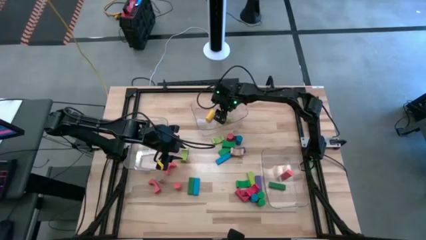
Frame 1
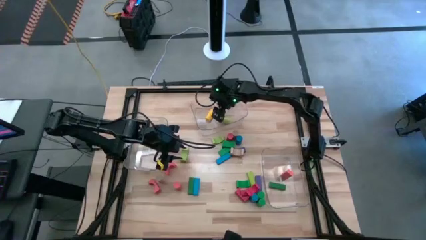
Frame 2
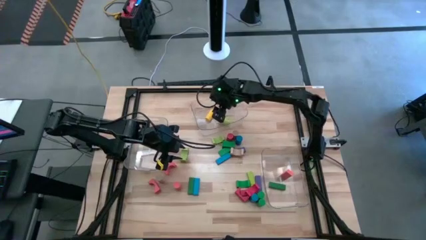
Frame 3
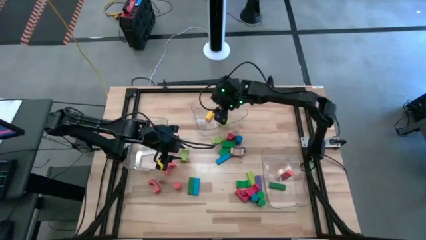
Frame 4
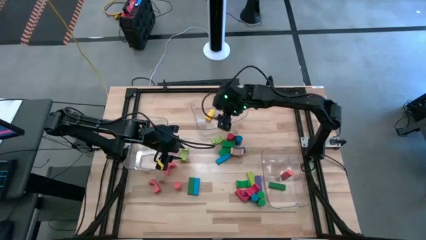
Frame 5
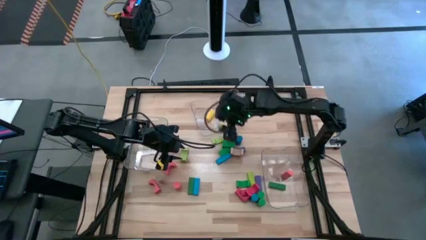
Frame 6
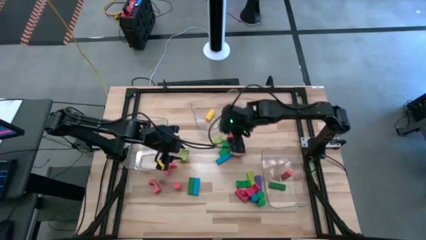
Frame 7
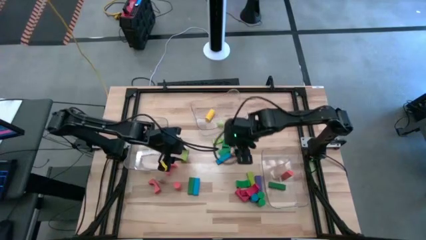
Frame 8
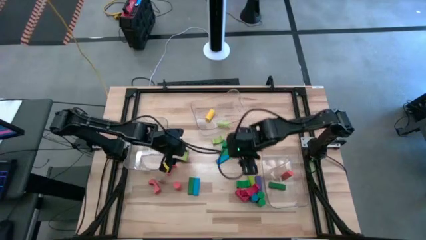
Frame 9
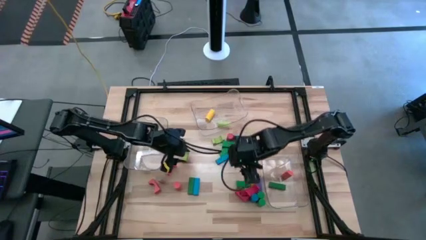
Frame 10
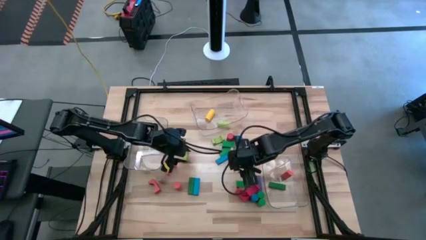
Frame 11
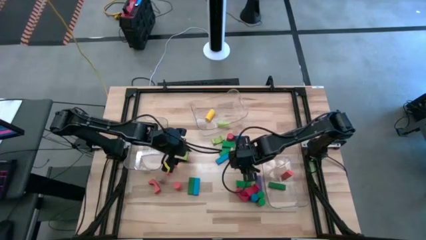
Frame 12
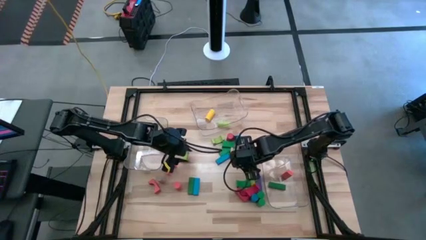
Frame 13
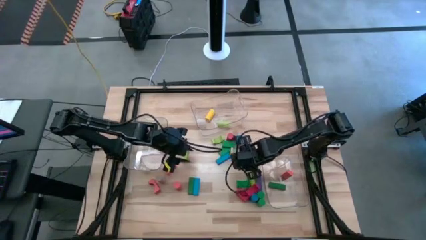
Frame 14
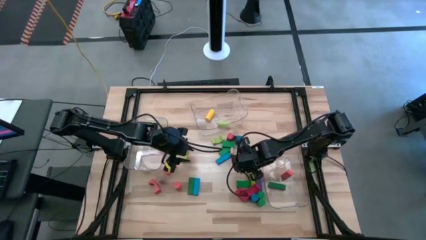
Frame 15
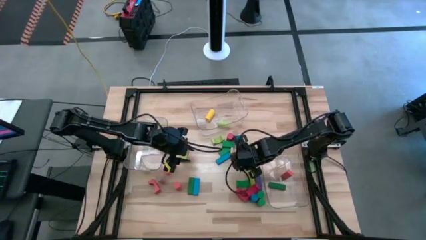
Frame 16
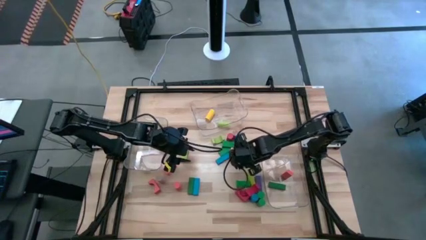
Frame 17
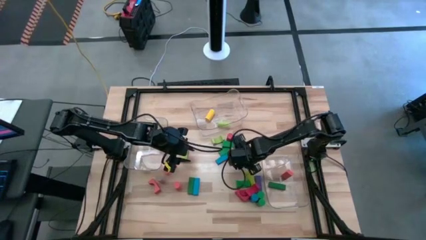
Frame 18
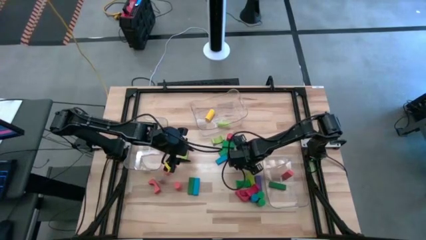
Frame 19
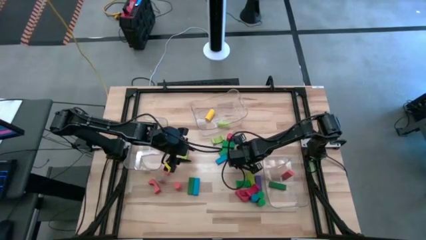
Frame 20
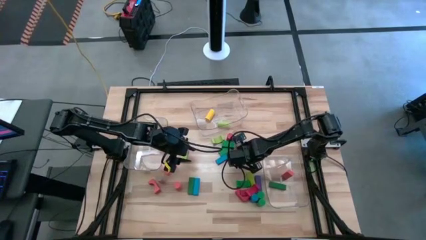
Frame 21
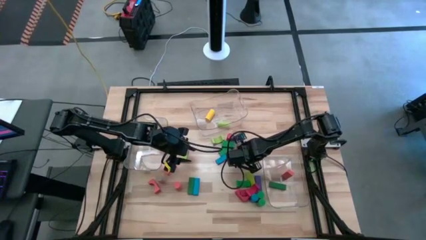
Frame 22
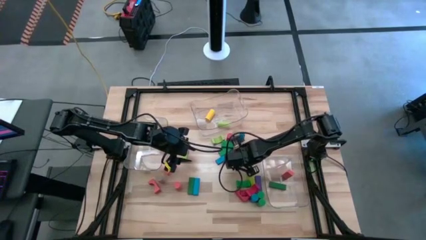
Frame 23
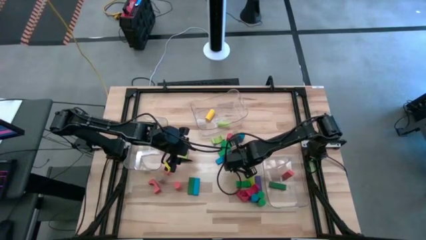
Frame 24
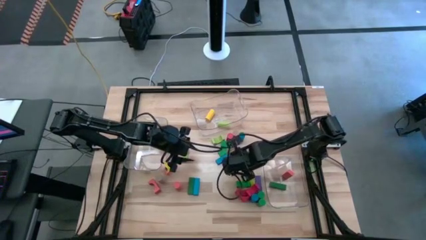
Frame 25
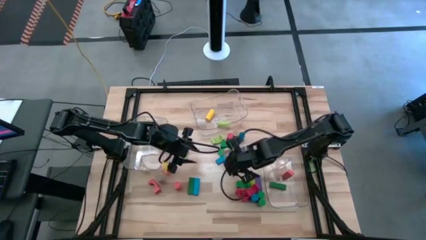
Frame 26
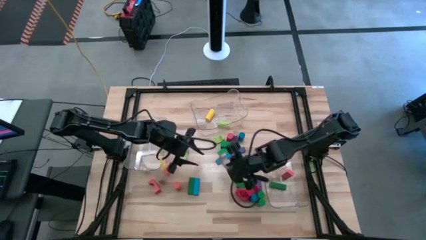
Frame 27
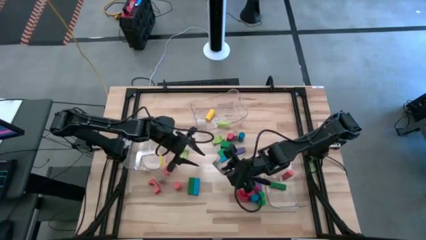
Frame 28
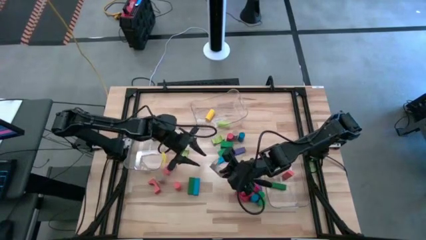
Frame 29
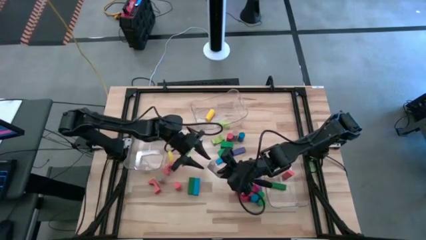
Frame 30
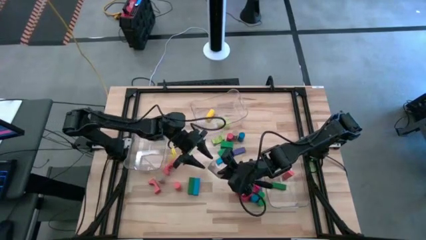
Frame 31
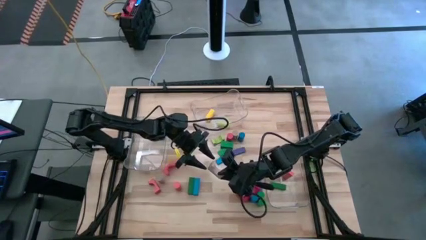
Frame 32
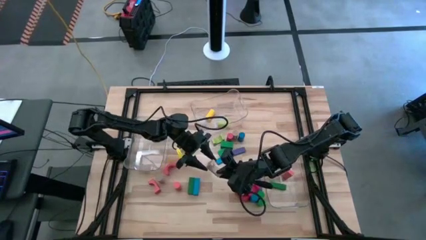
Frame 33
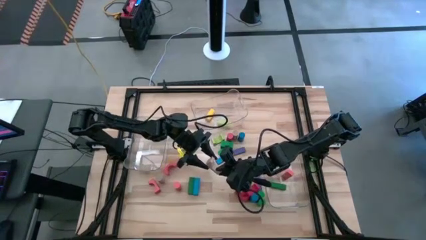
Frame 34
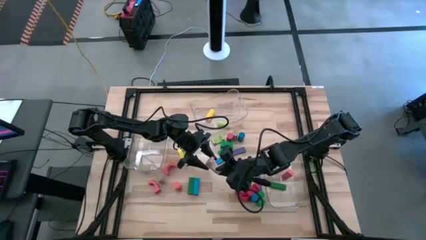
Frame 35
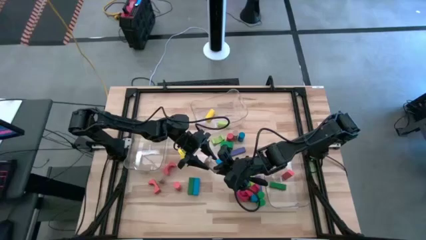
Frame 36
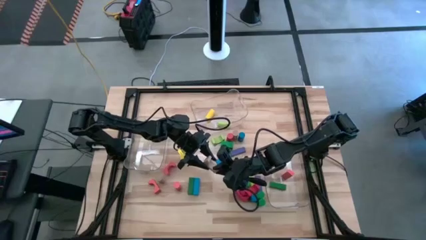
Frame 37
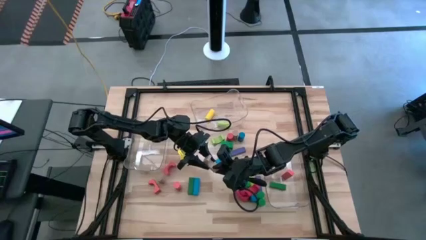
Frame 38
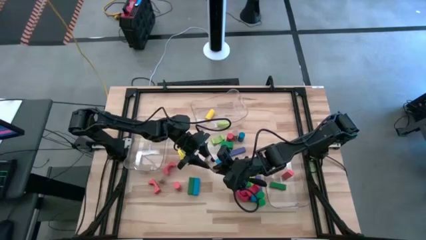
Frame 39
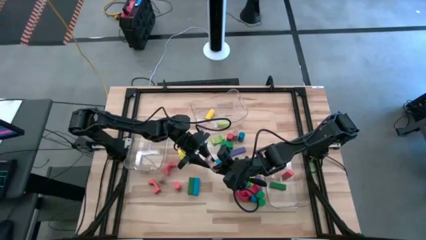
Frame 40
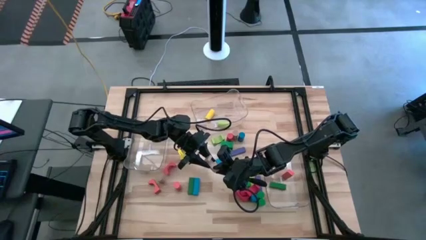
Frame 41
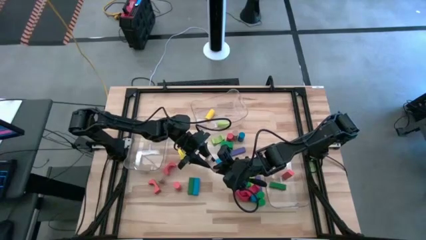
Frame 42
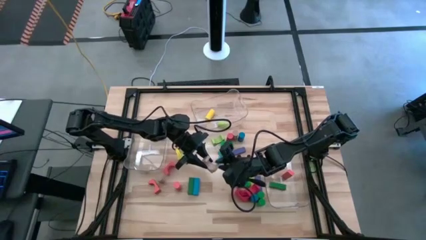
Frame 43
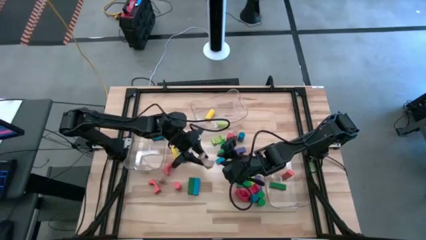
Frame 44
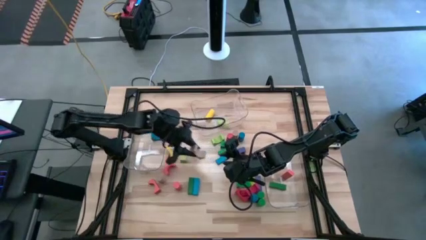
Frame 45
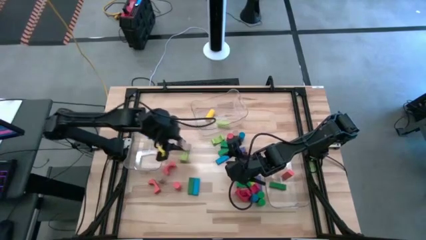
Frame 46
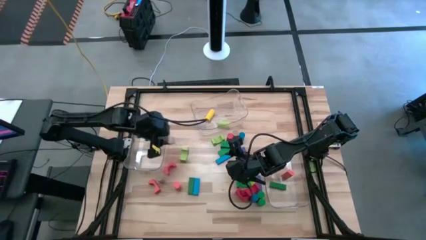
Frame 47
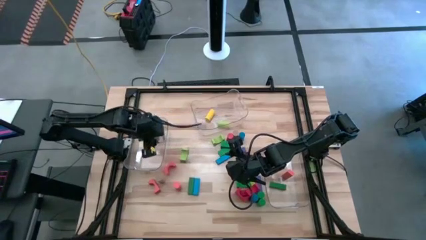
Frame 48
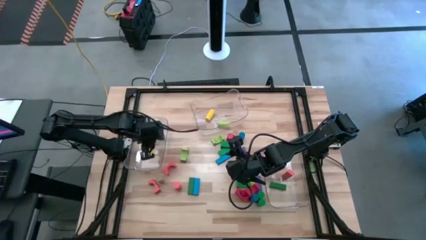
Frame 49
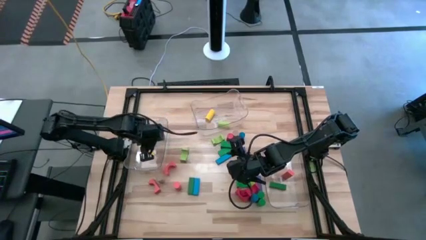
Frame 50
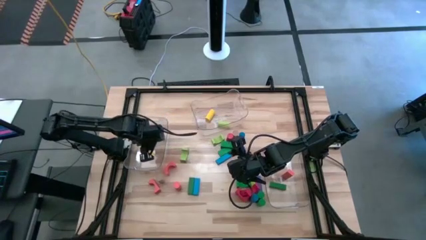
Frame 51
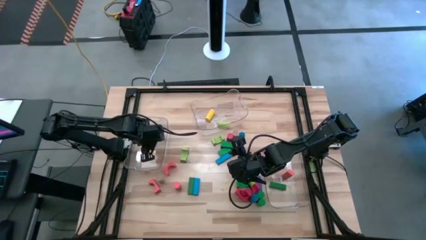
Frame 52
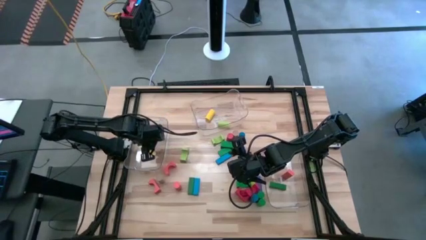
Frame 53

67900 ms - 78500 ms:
Task: Sort blocks by size
Put the brown arch block into the left transparent bin

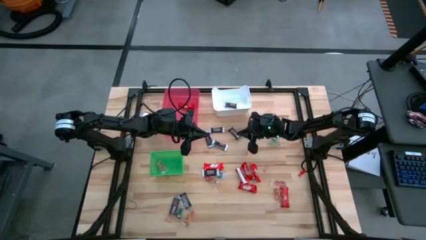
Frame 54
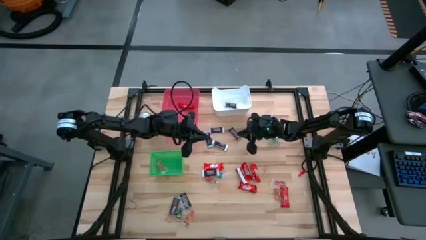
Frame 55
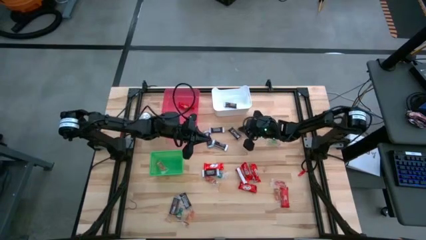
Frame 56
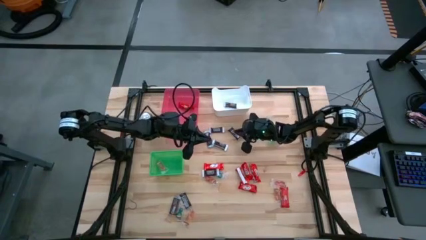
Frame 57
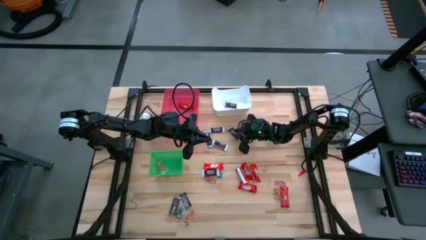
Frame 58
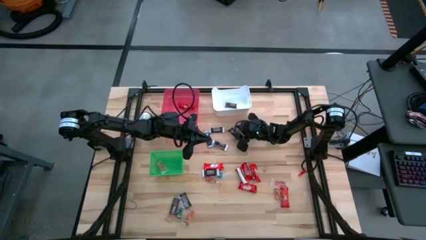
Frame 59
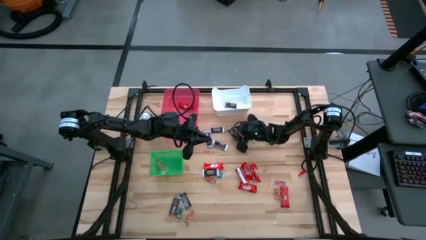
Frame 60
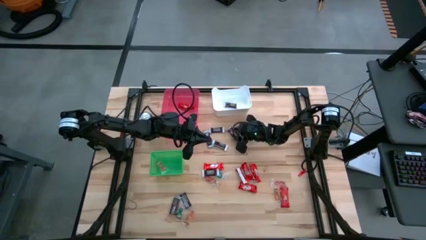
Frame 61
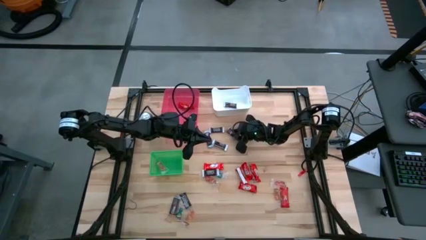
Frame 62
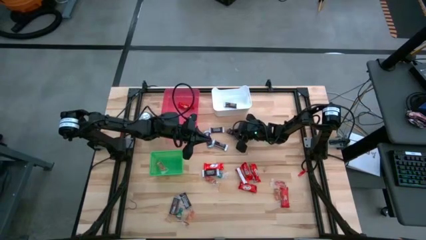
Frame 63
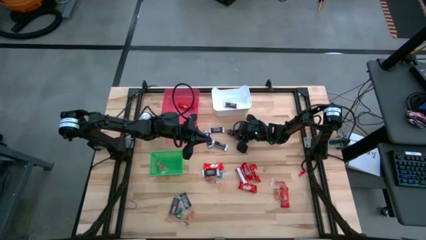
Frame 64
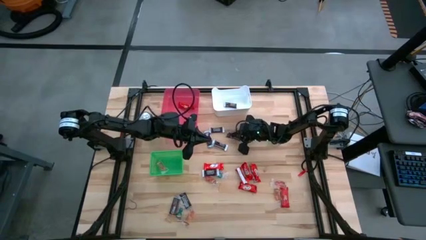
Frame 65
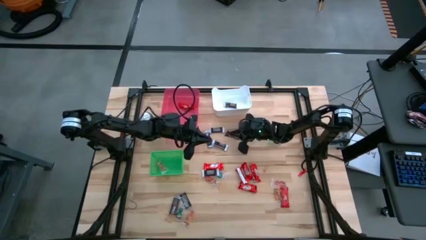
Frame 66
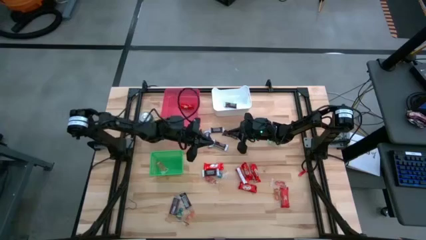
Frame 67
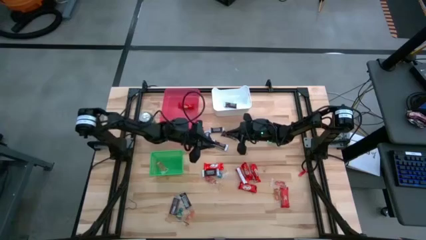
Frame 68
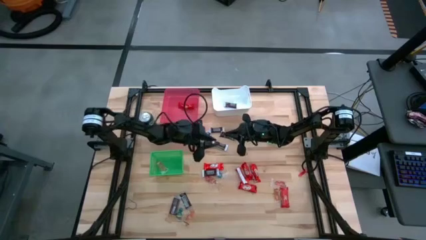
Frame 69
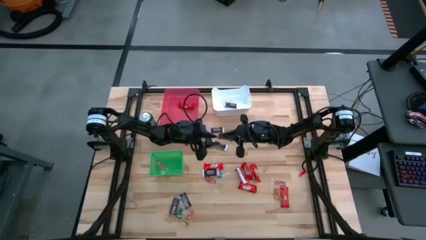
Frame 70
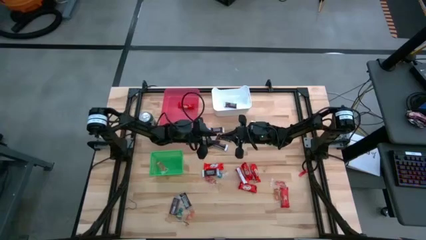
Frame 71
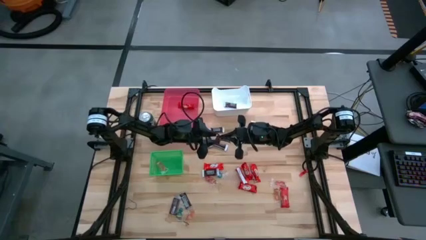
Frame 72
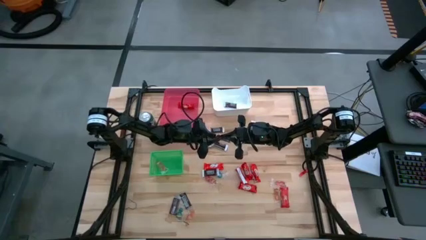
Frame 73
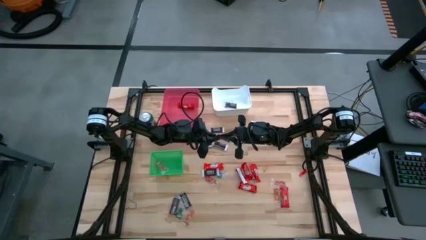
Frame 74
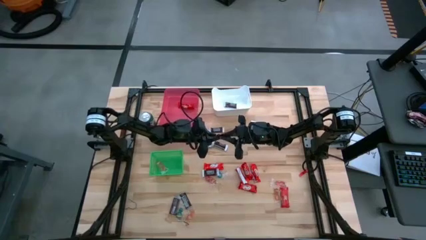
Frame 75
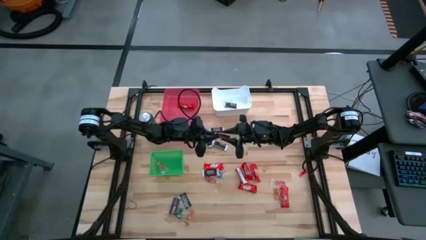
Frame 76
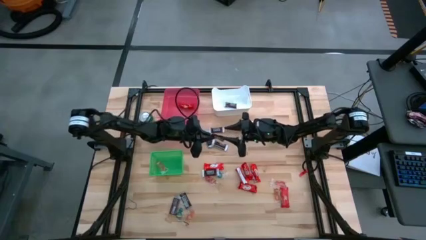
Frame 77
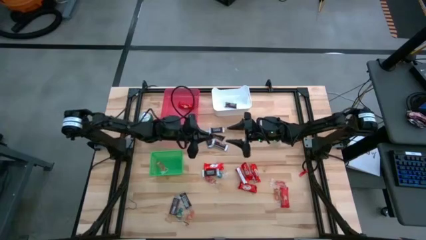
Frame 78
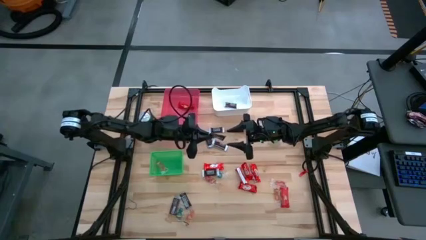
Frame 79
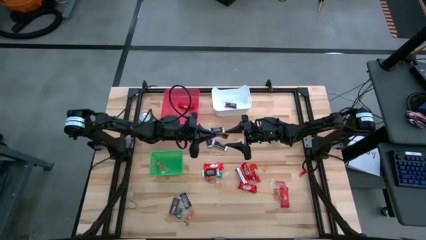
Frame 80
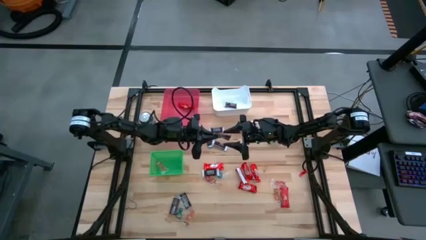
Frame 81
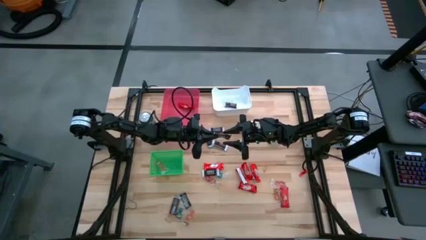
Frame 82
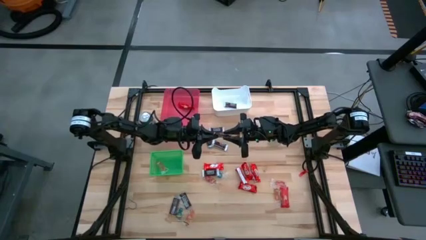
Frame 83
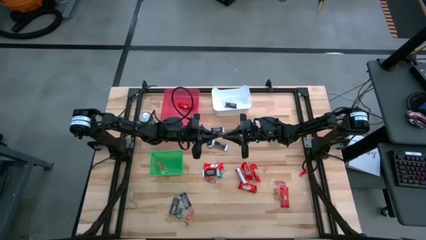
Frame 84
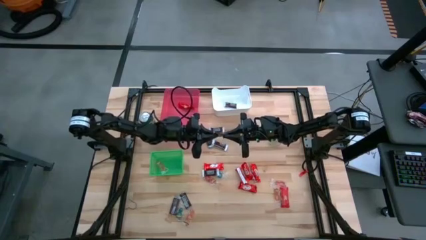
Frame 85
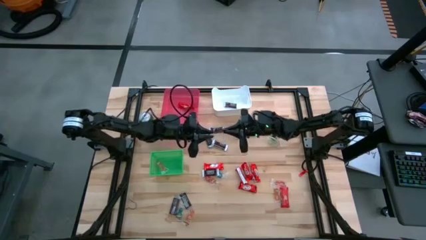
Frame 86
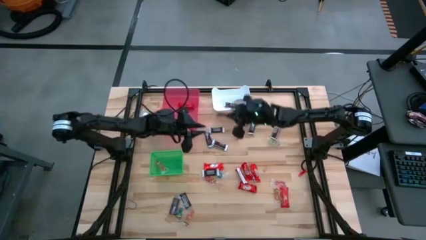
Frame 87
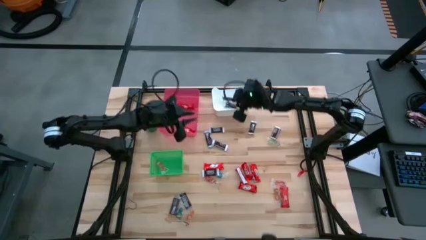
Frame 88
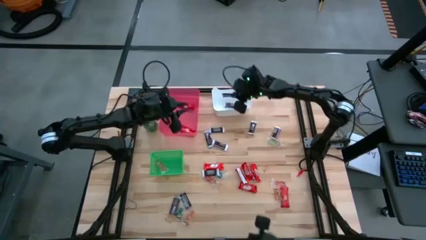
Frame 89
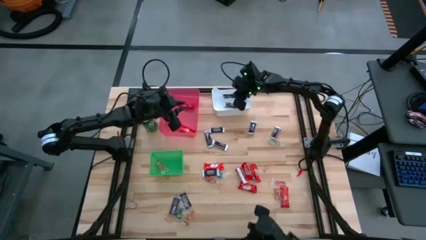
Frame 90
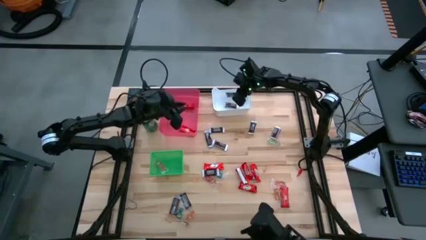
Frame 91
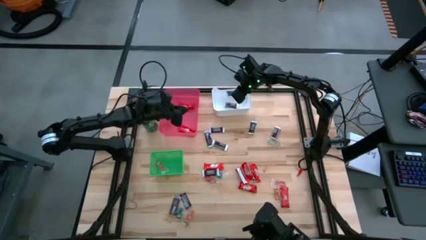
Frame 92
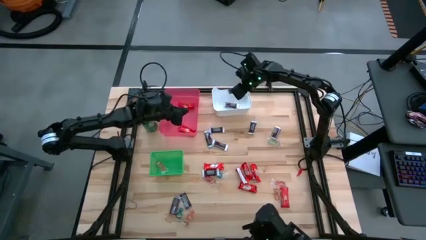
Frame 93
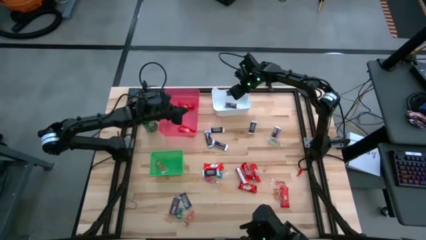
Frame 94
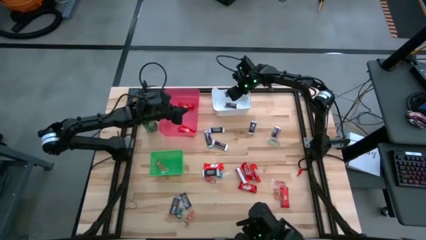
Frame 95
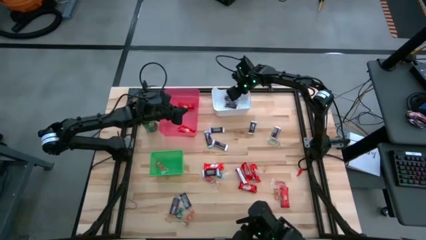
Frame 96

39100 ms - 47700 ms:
Task: Organize candy in baskets
Put the brown chocolate into the white bin
